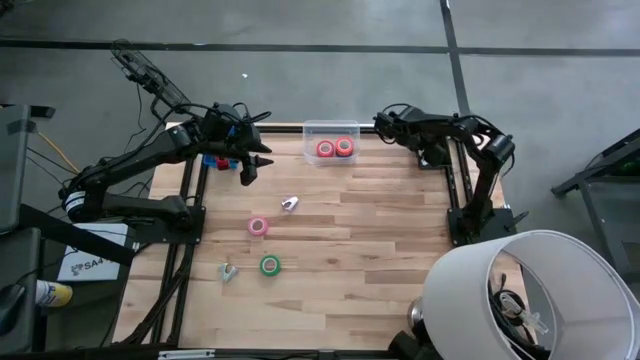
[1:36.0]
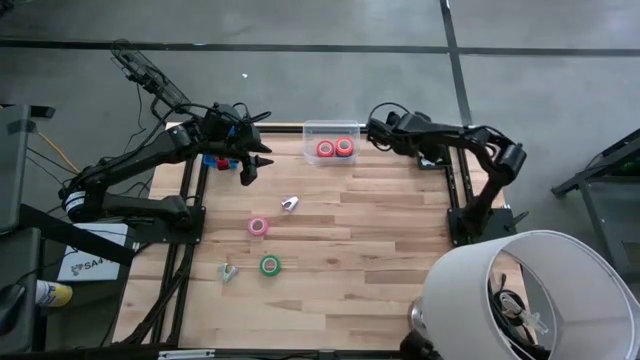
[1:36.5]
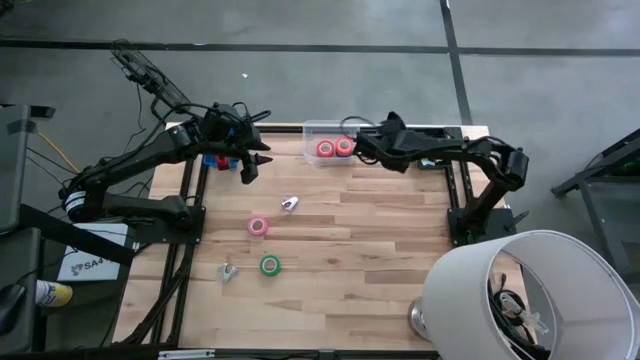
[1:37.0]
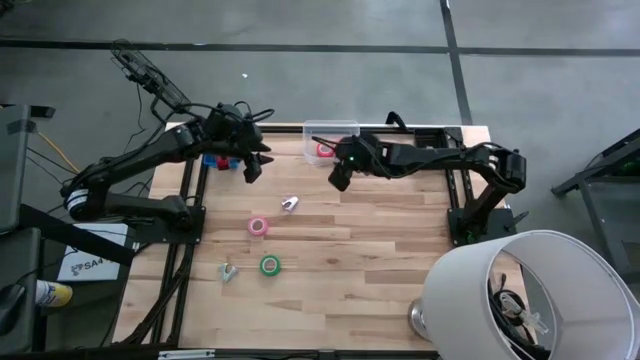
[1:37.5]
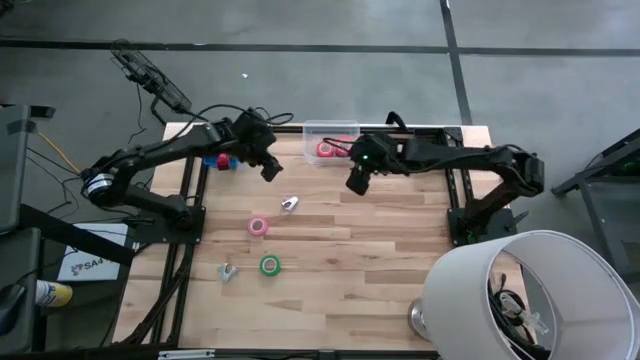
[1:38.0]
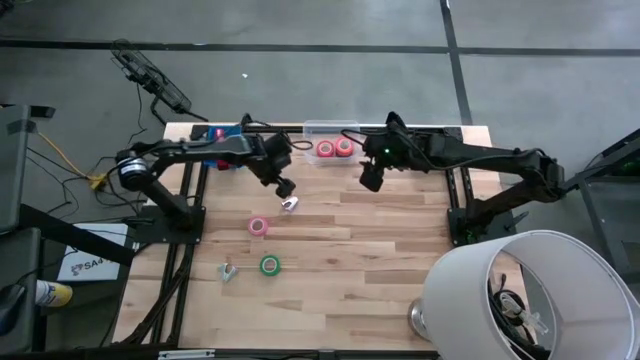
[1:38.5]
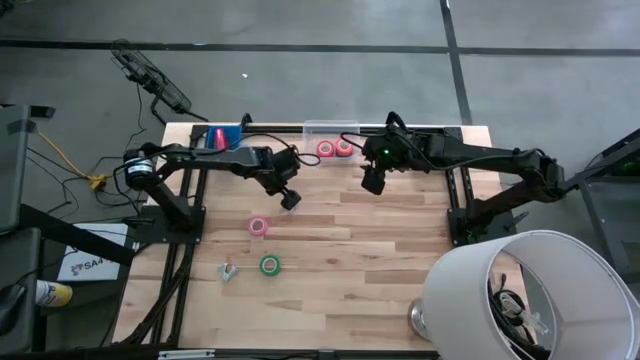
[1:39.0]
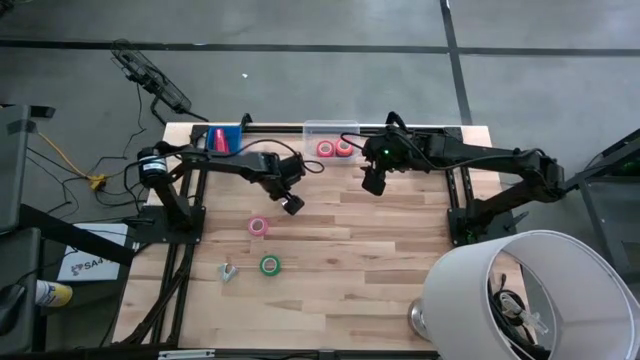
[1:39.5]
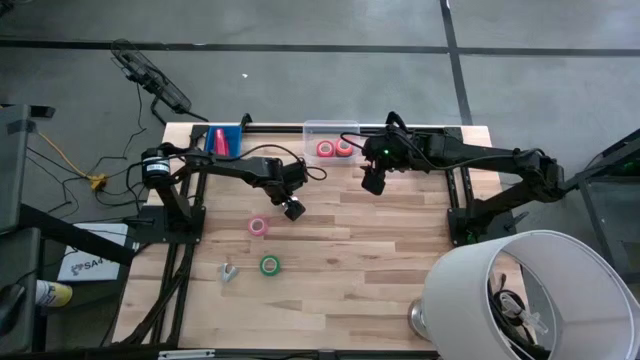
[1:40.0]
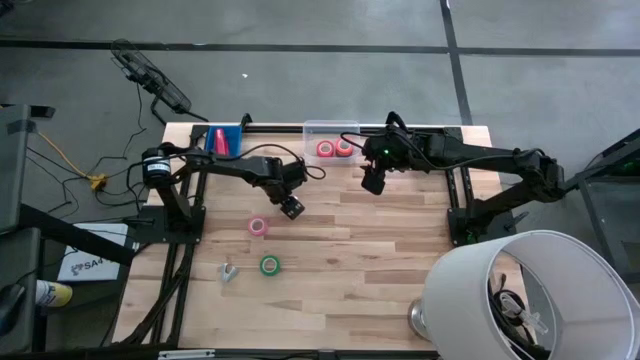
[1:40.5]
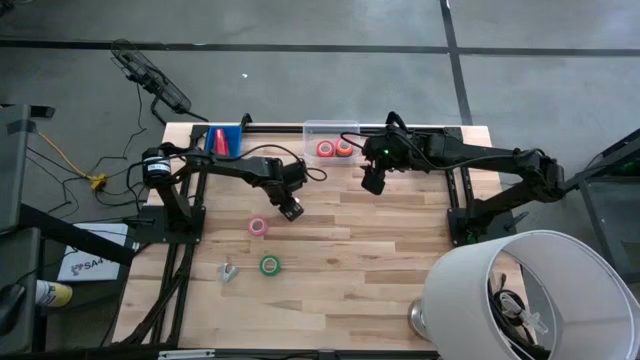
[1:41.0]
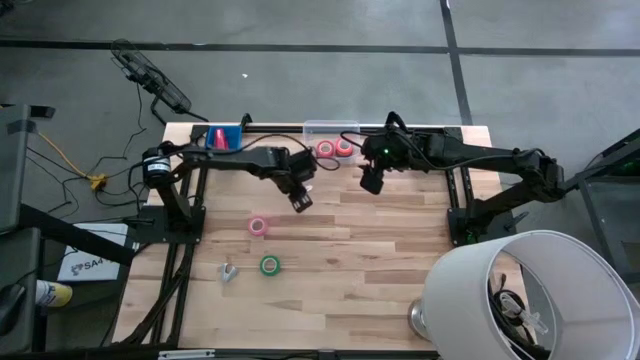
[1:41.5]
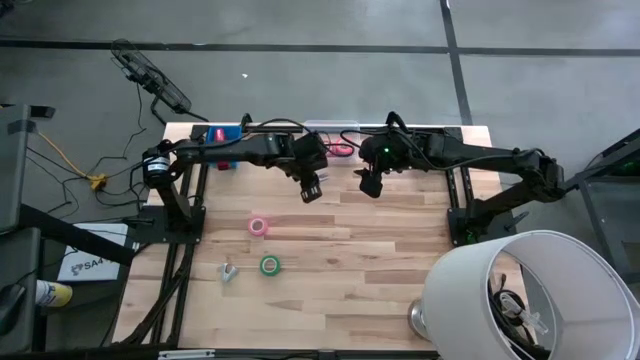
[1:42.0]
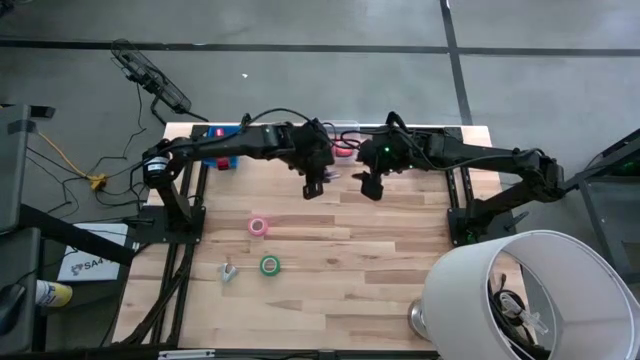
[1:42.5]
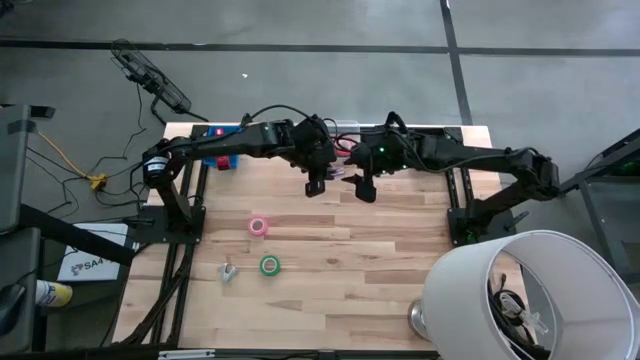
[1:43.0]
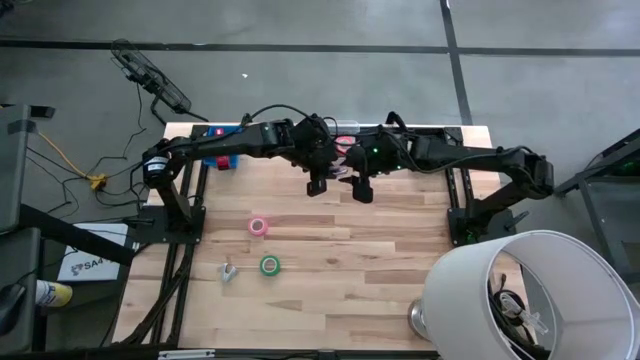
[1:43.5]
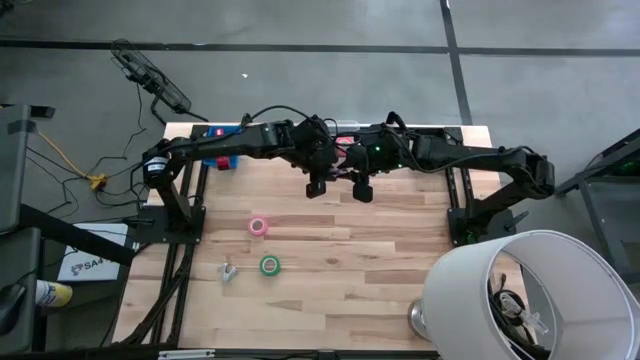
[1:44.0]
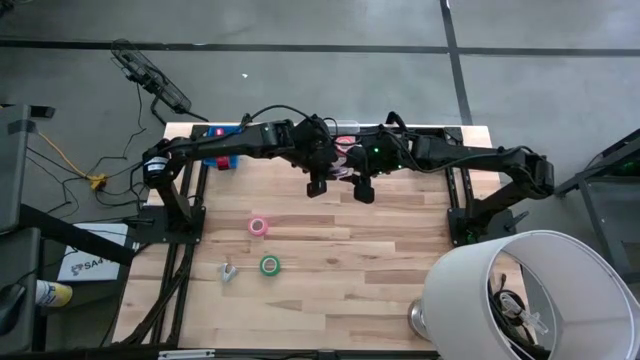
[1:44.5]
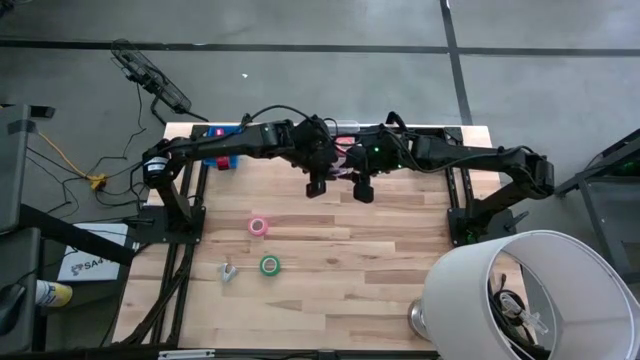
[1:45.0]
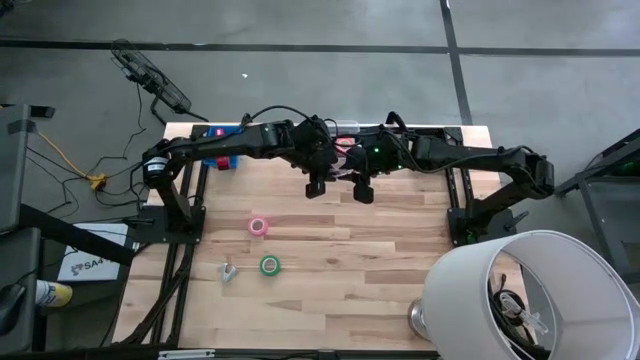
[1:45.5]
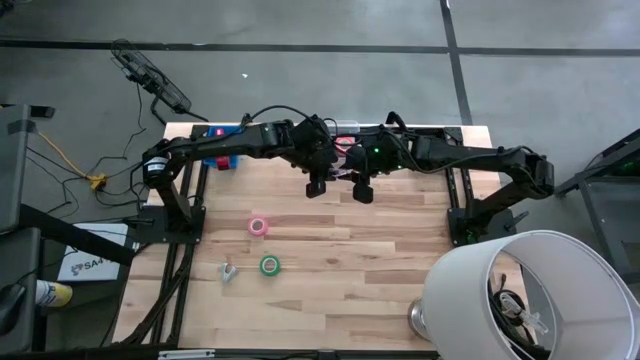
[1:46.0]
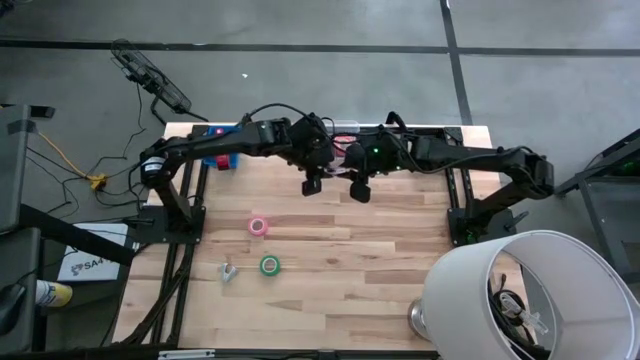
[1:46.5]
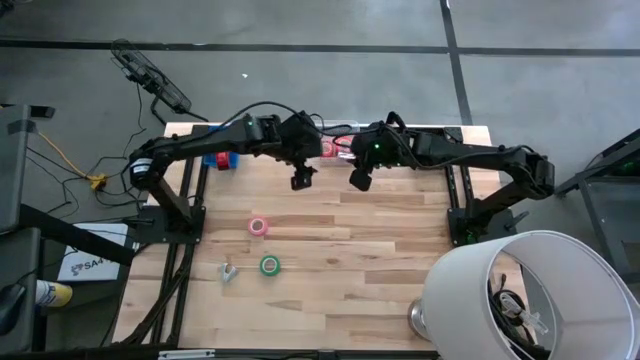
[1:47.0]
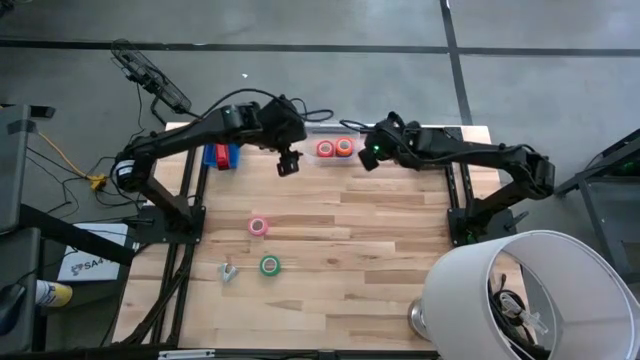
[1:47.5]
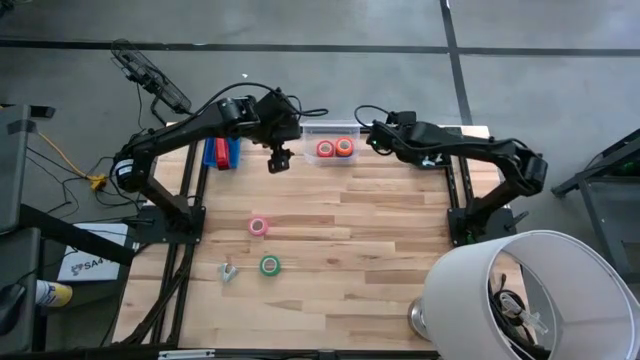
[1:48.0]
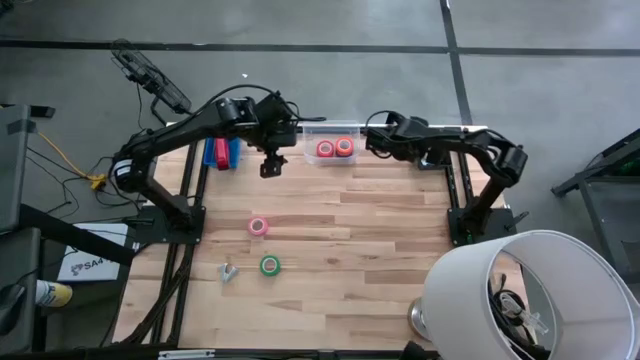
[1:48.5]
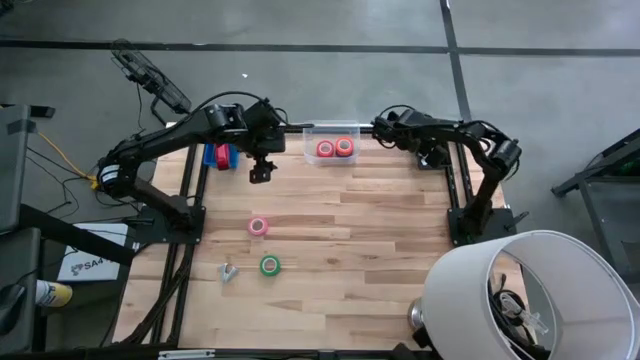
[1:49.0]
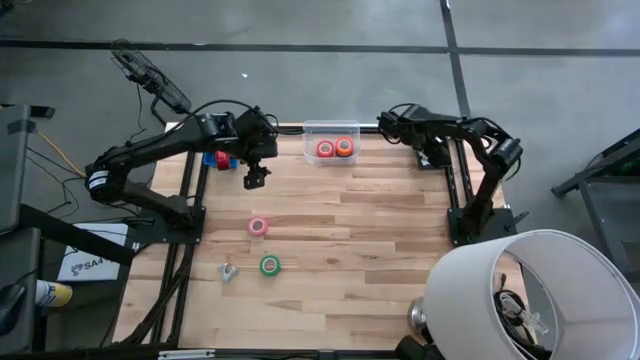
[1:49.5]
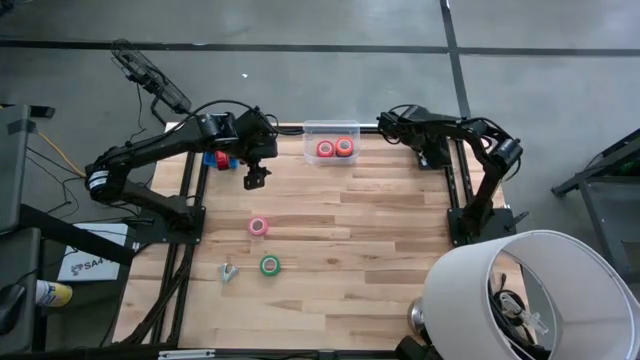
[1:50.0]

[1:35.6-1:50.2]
Task: Pick and place Stapler, Stapler remover, tape
Put the purple staple remover into the black bin

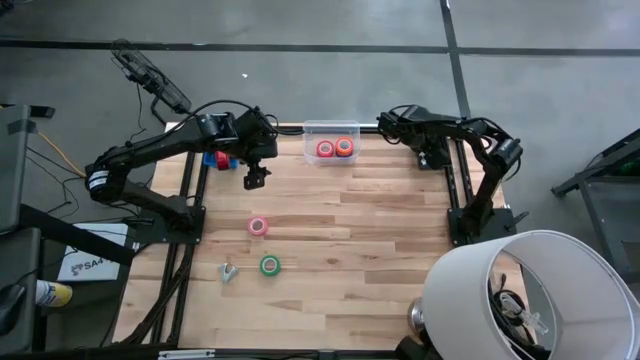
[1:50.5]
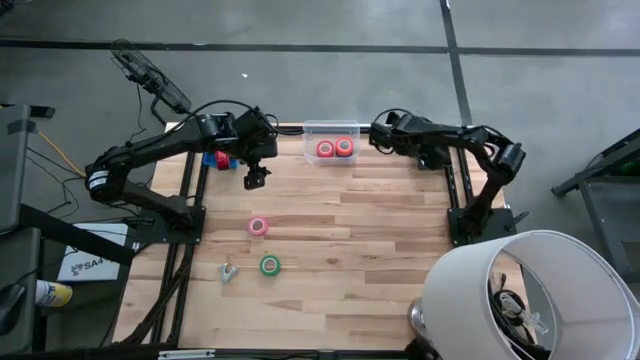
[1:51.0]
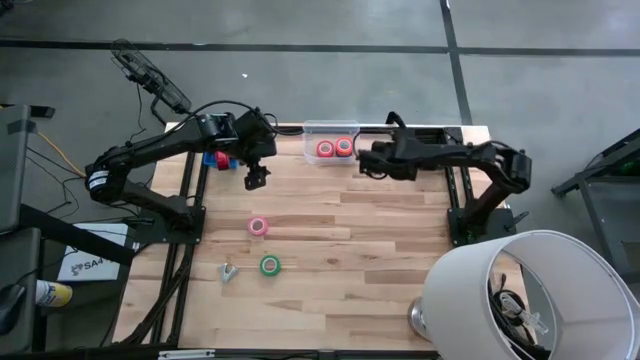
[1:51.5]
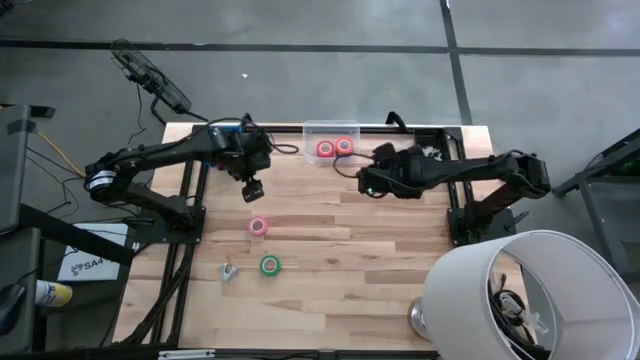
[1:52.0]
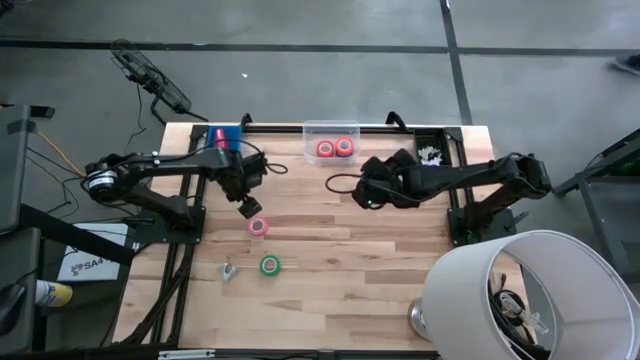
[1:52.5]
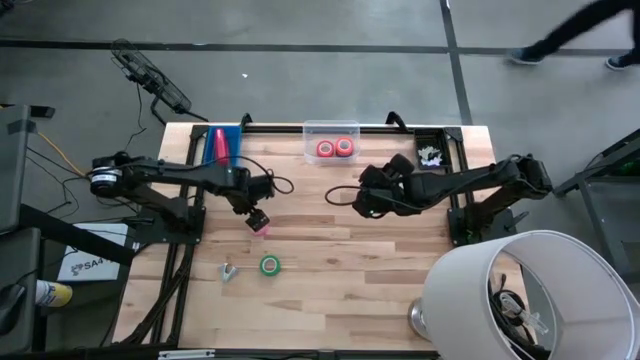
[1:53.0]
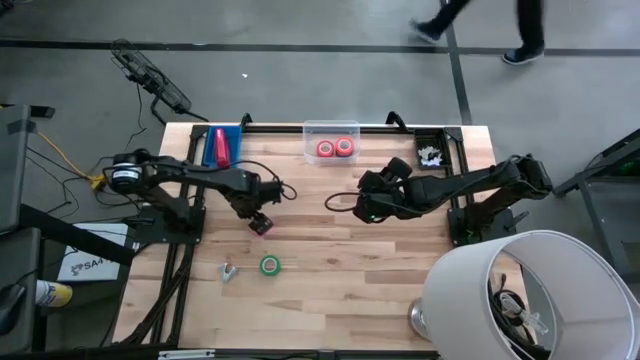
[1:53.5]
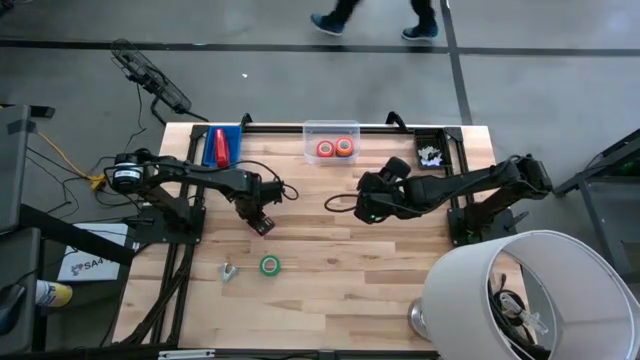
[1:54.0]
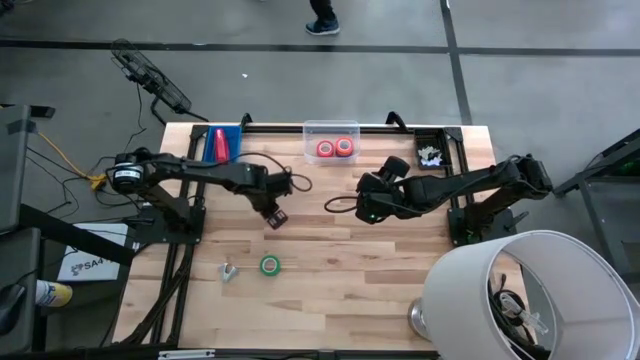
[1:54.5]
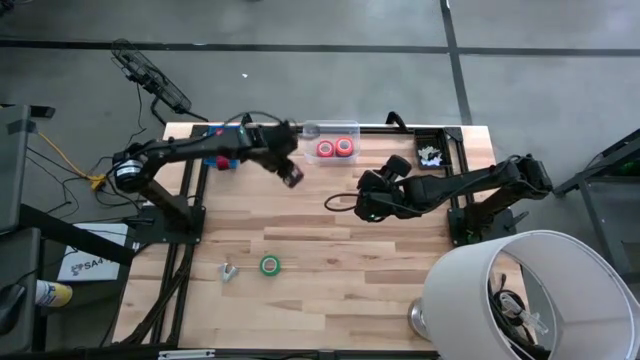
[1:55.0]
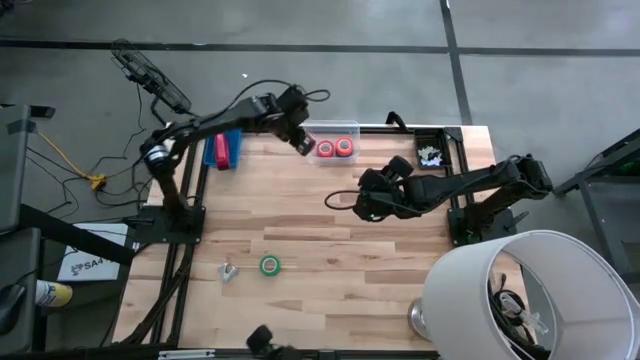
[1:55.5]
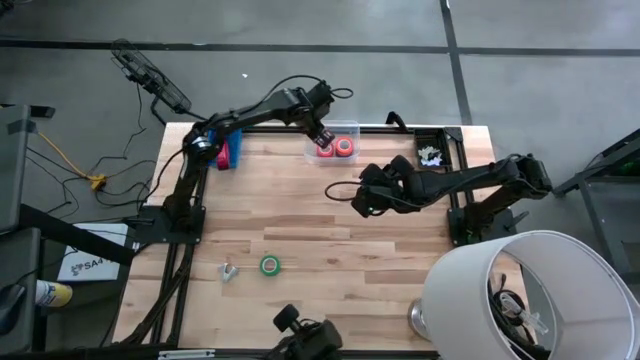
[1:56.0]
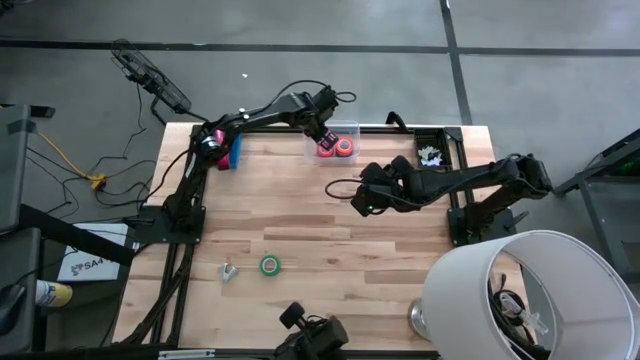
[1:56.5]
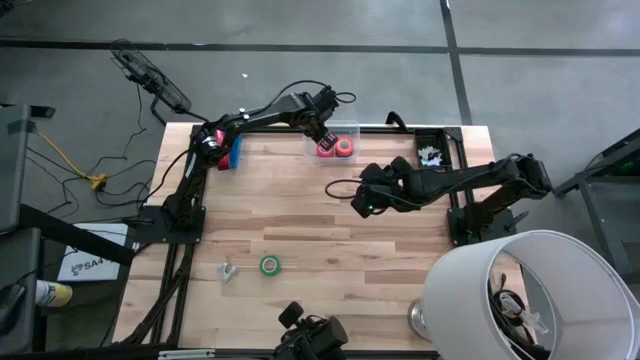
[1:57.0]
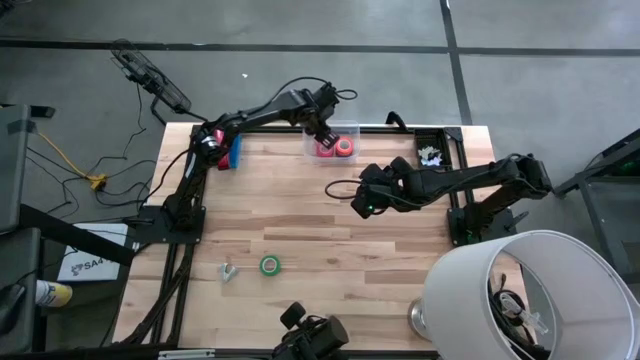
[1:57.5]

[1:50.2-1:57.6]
Put the pink tape into the transparent bin
